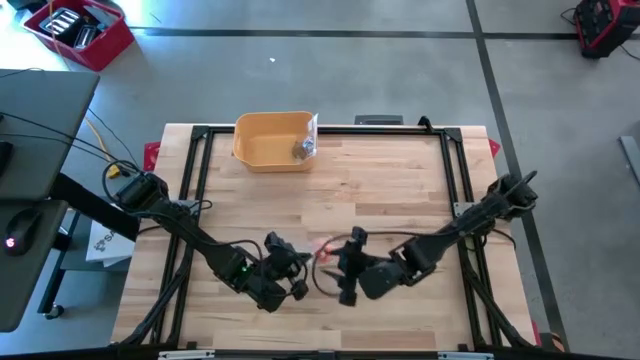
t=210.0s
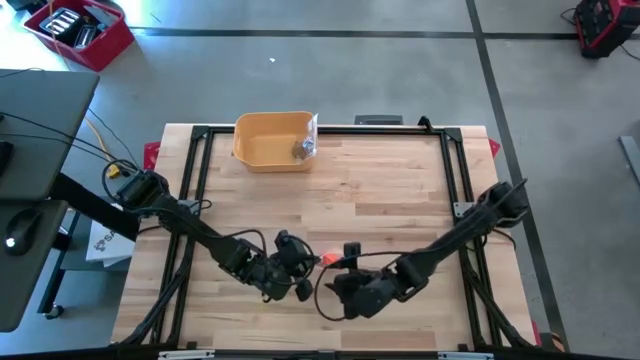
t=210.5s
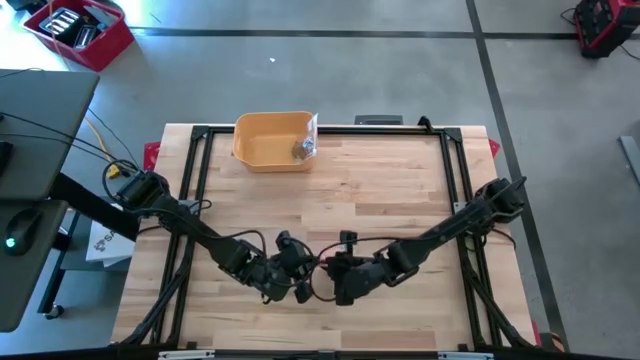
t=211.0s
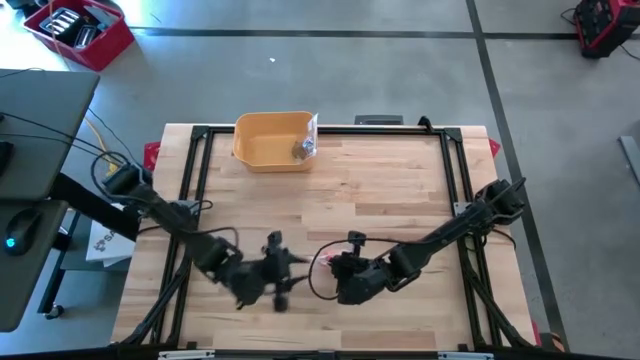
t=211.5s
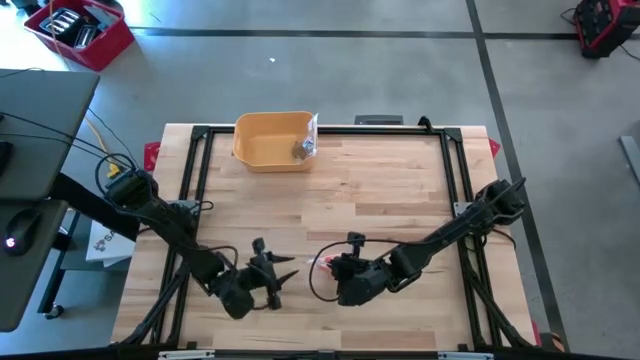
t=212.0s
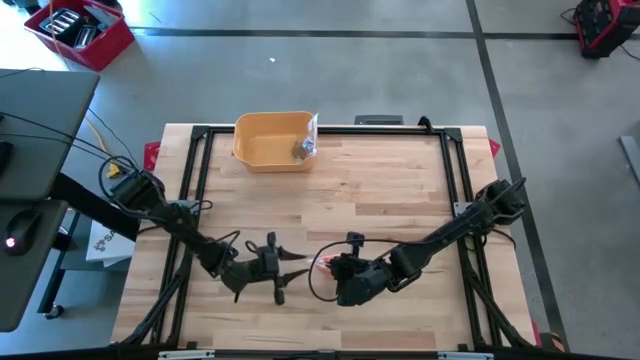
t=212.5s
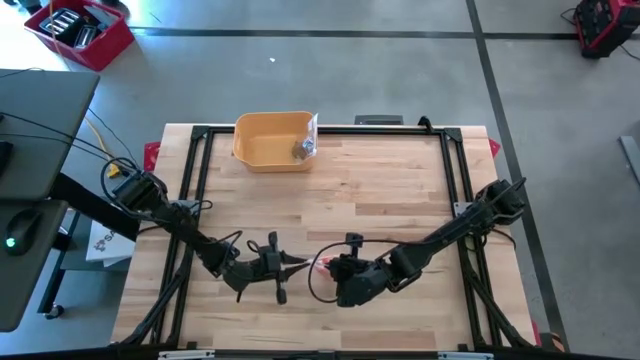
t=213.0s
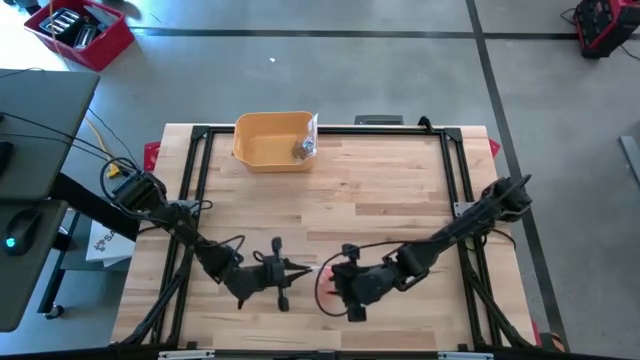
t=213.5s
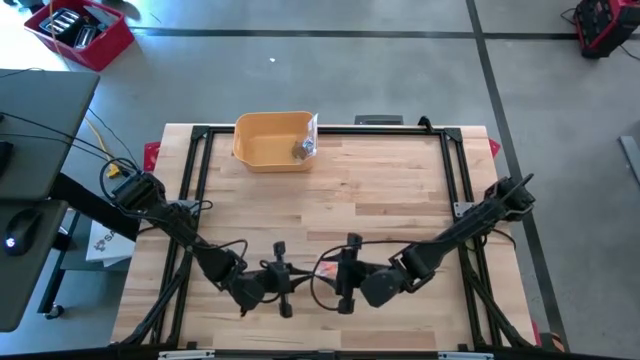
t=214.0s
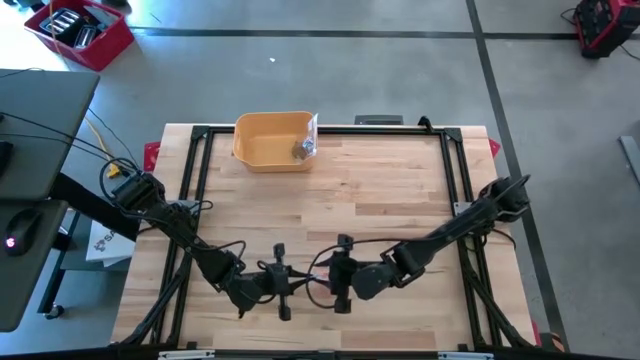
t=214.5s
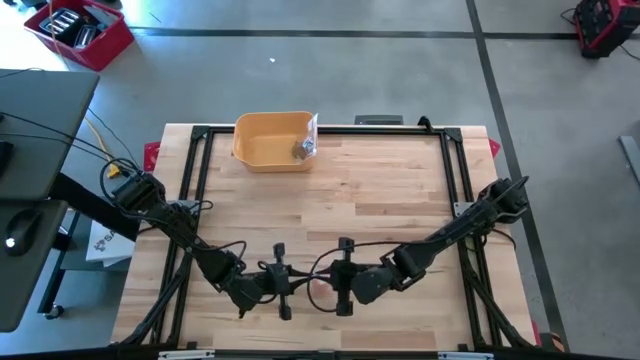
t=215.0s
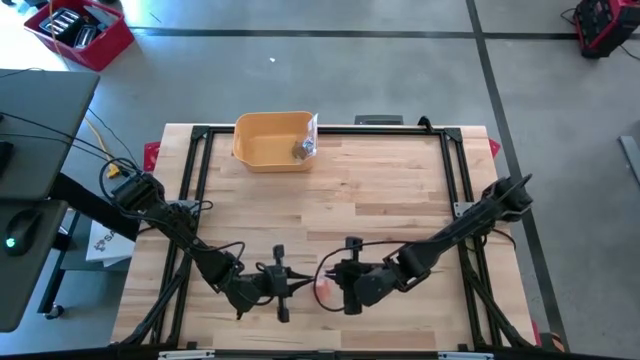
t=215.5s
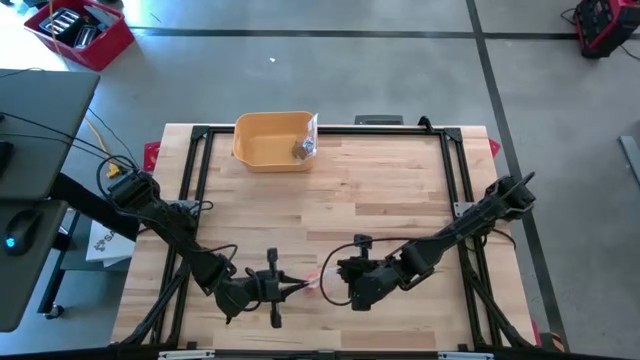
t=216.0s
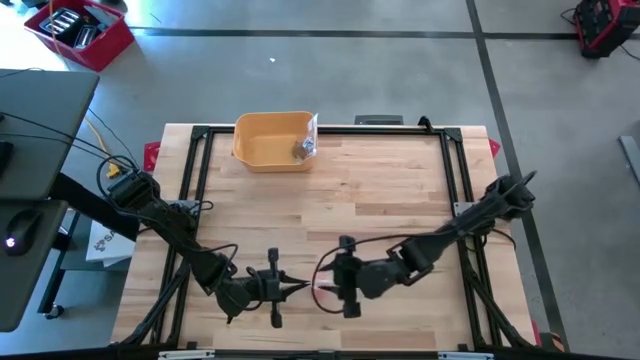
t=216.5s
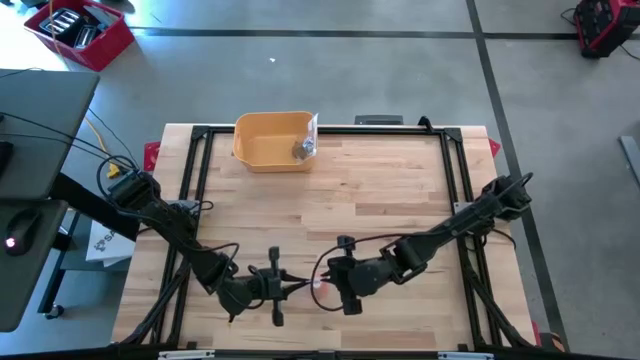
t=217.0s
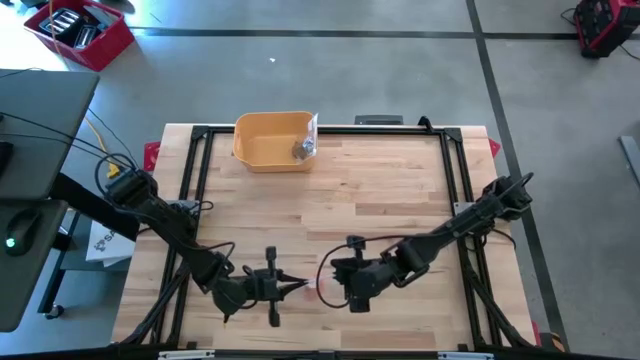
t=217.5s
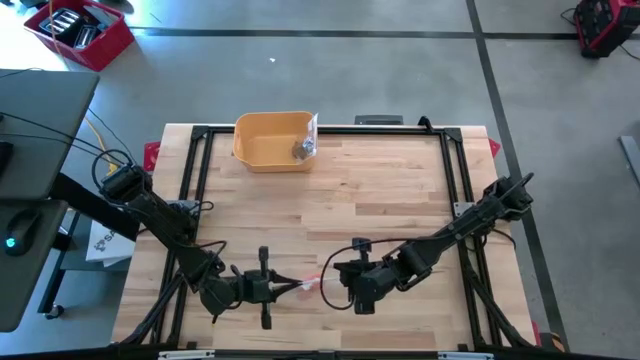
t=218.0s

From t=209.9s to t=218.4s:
Task: Roll bandage
Close the transparent zip bag

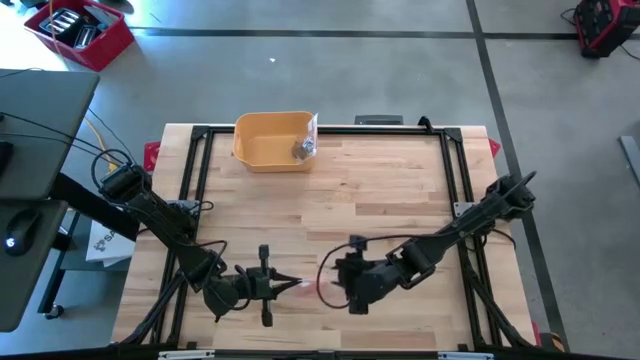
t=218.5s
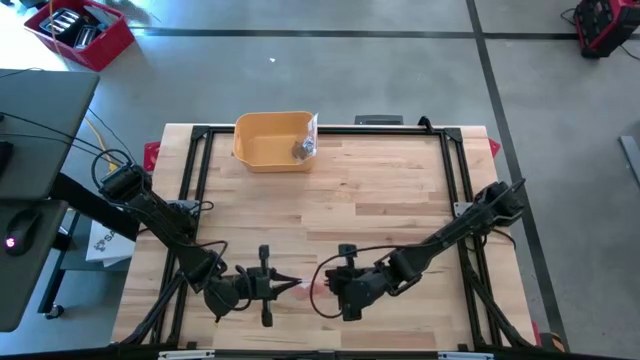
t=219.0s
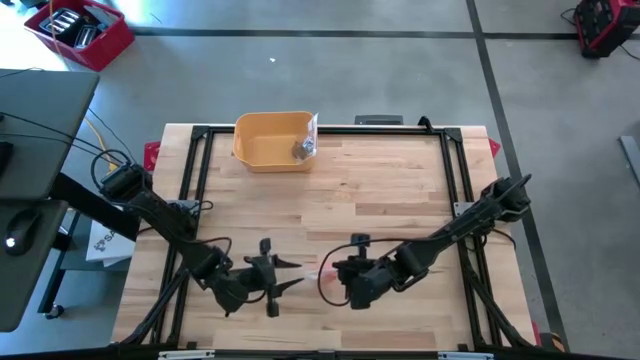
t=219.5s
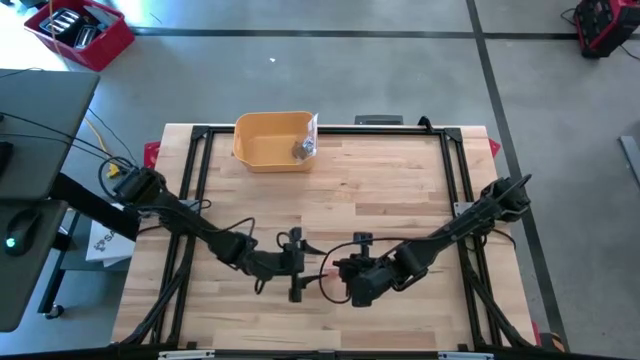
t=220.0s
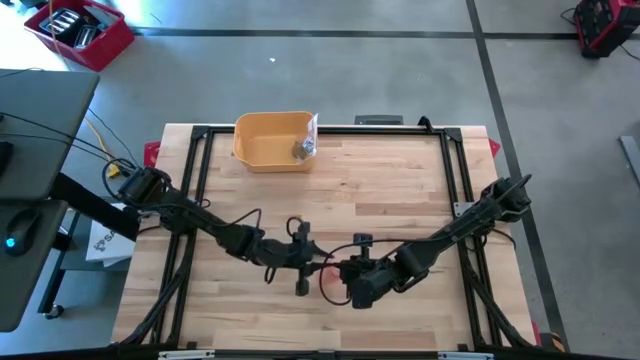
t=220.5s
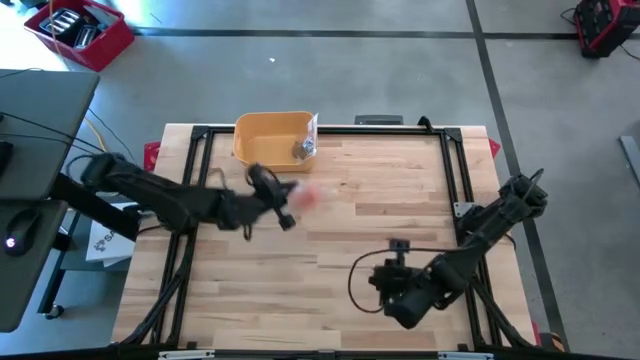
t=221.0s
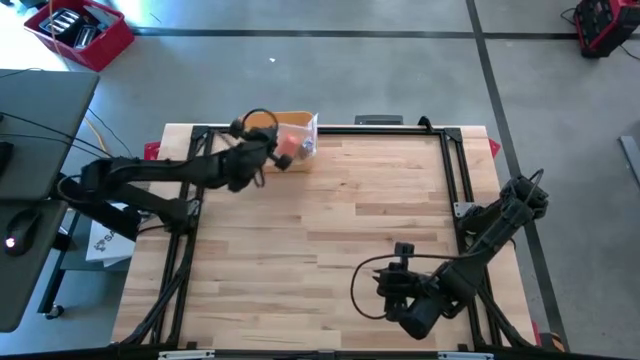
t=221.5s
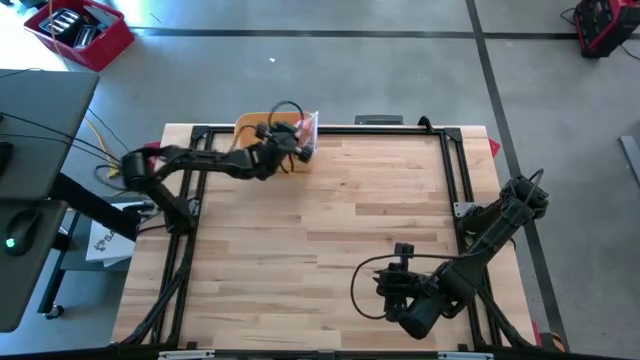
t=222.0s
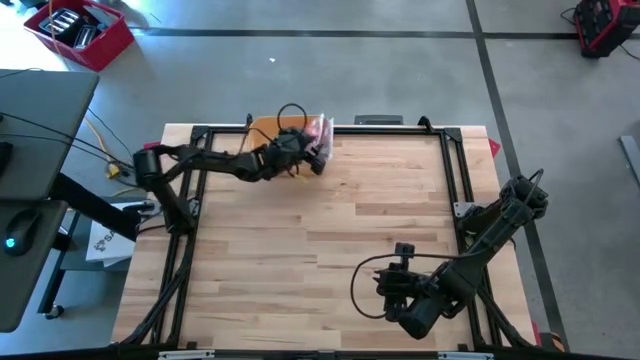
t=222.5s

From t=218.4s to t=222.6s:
Put the transparent zip bag containing the rolled orange bandage into the yellow bin

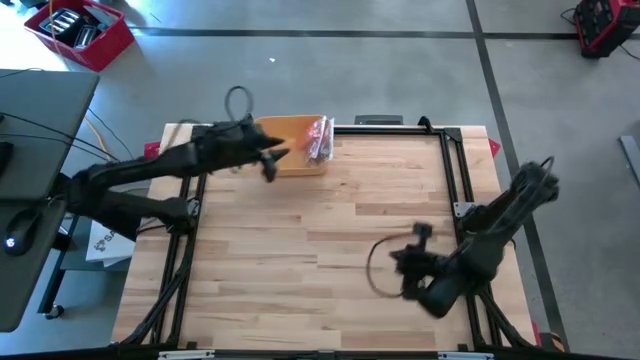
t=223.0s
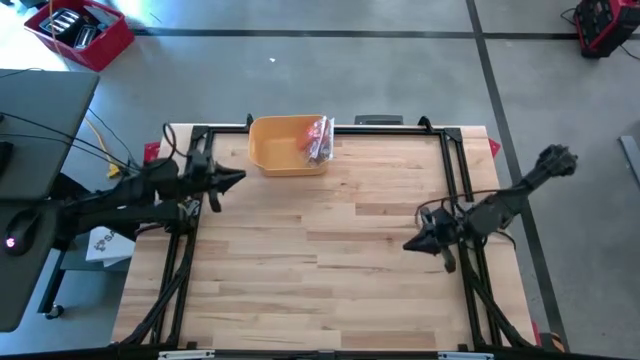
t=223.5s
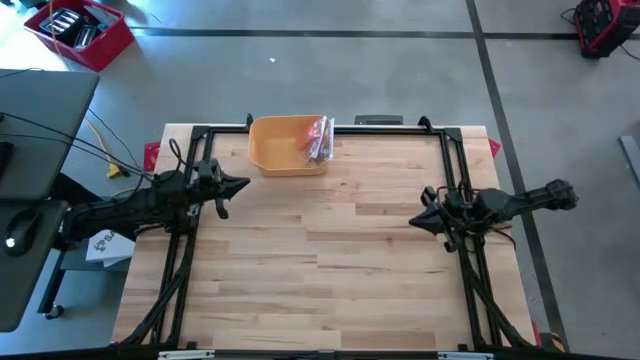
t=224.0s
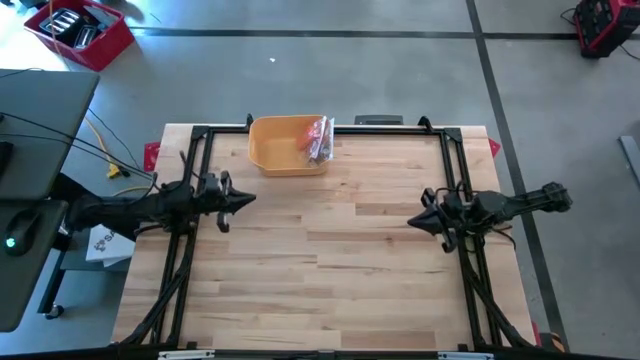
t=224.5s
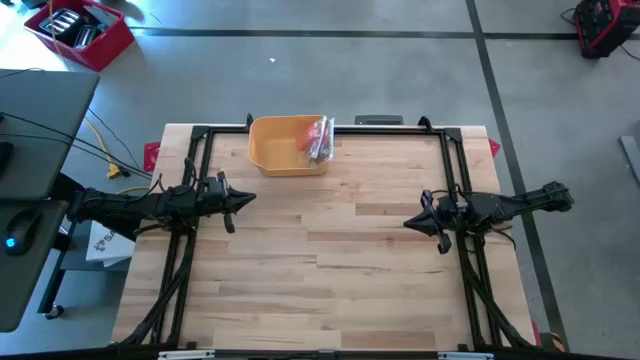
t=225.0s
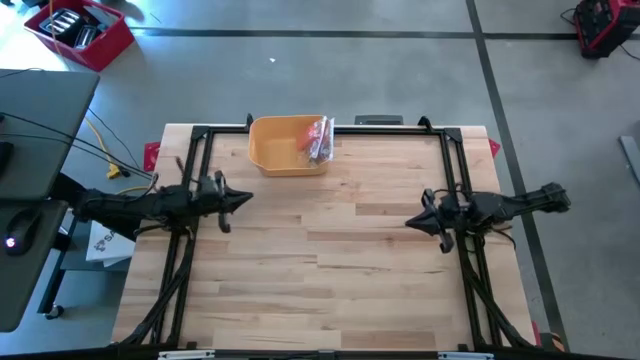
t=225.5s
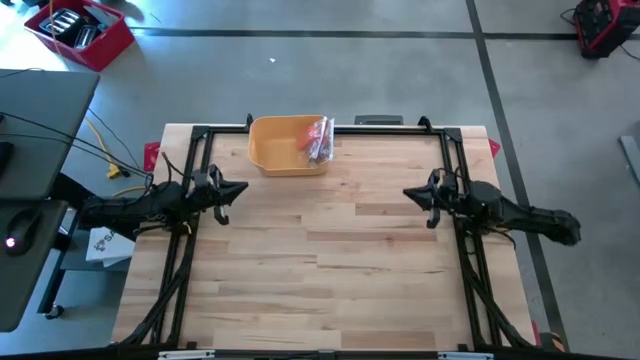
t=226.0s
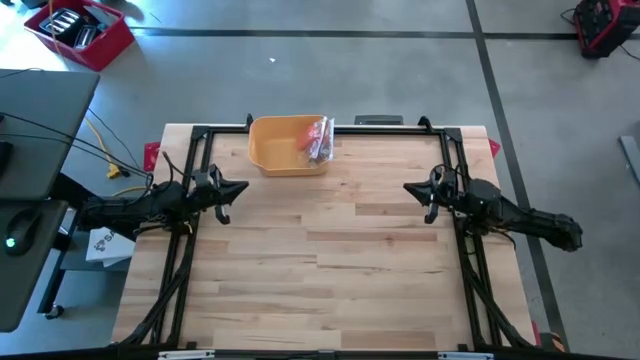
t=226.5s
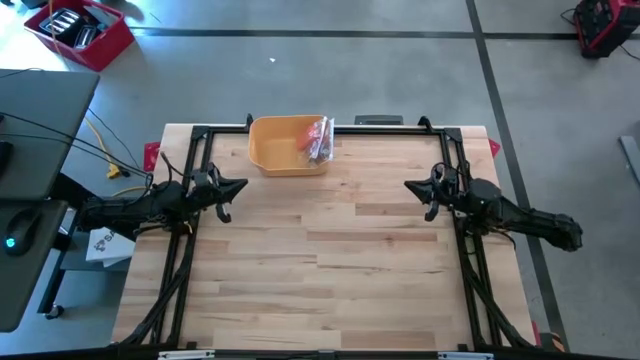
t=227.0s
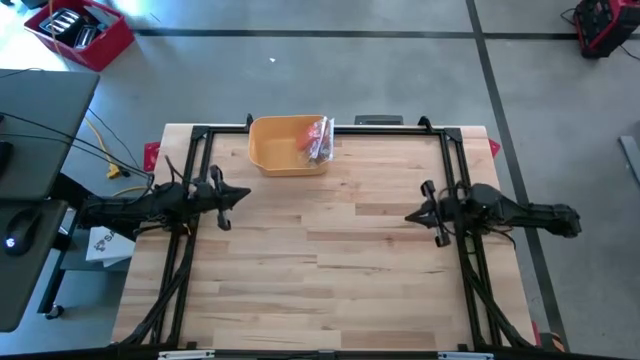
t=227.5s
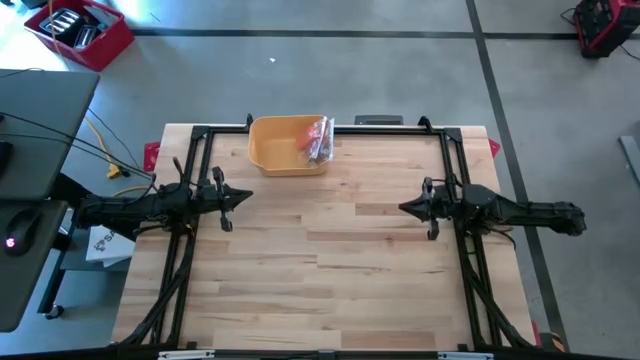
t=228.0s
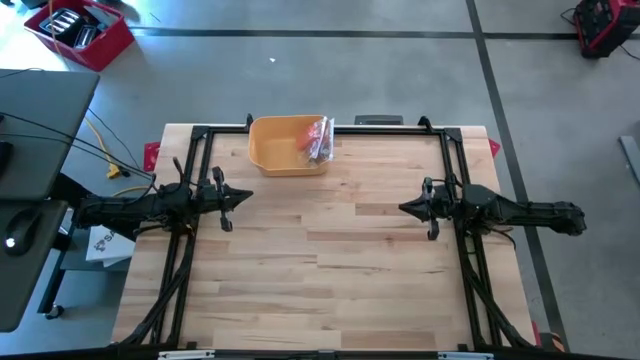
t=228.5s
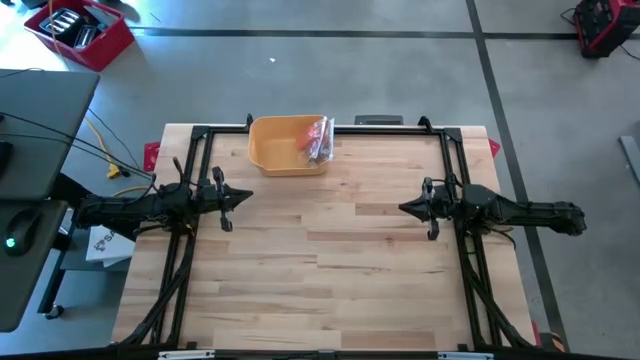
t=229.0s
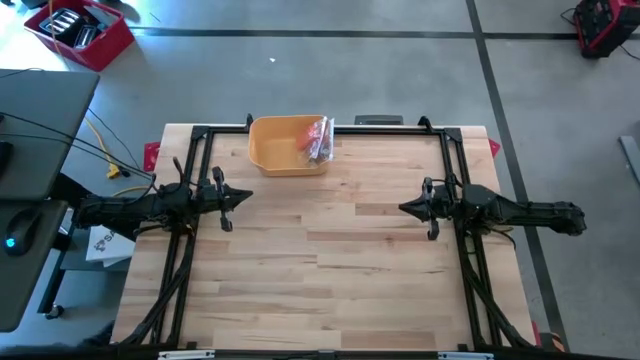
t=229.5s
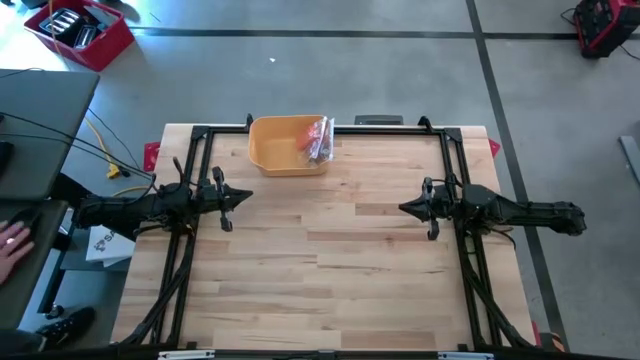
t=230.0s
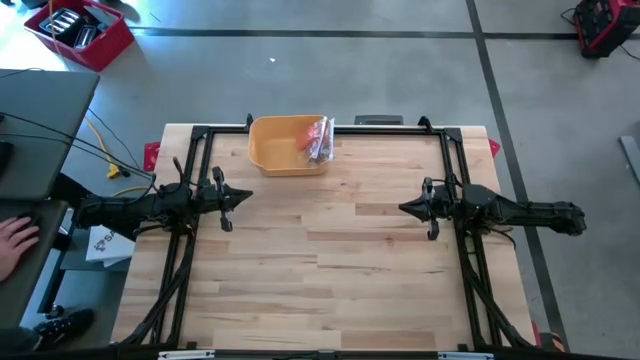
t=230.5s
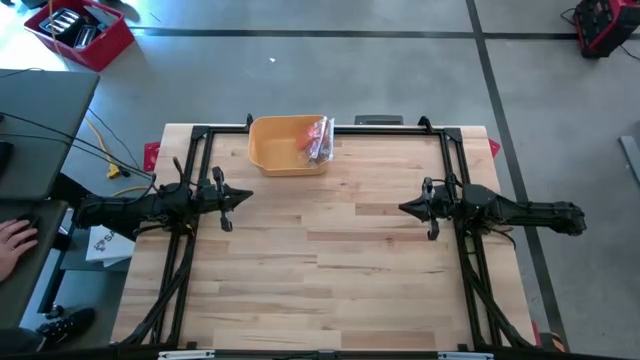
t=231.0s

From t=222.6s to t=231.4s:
Return to Home Position
